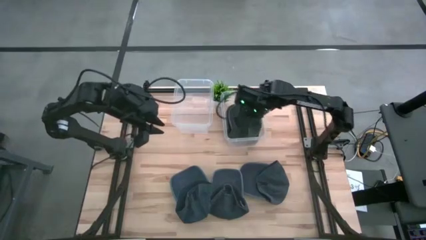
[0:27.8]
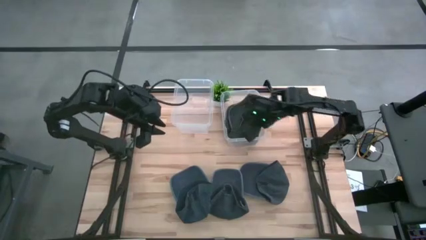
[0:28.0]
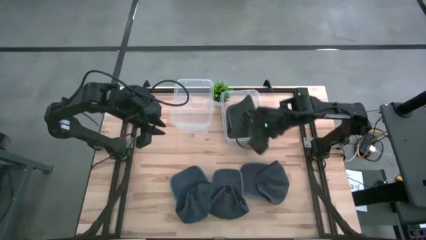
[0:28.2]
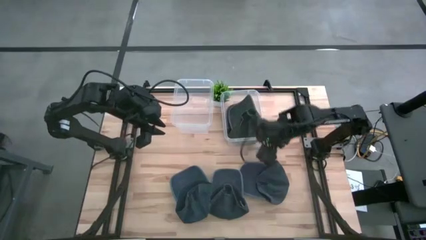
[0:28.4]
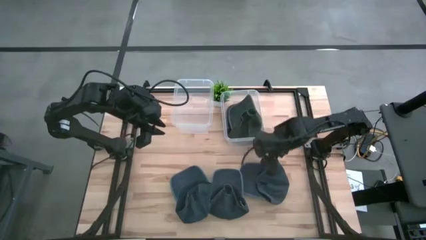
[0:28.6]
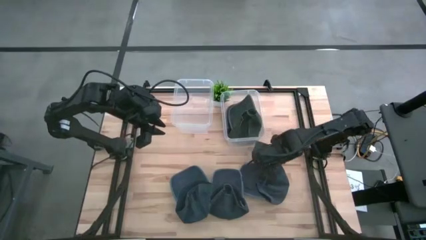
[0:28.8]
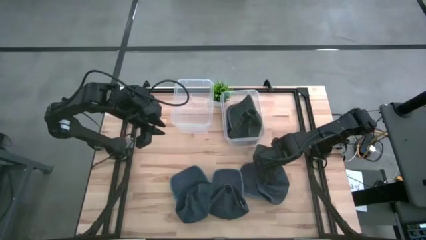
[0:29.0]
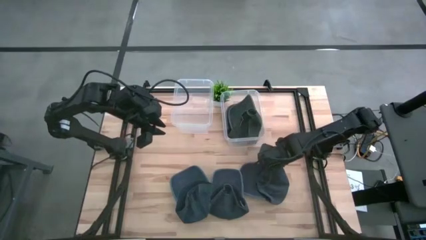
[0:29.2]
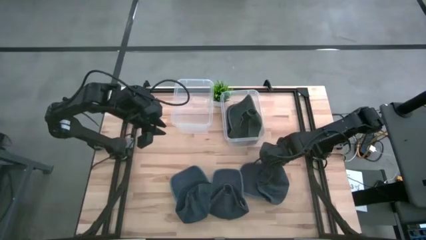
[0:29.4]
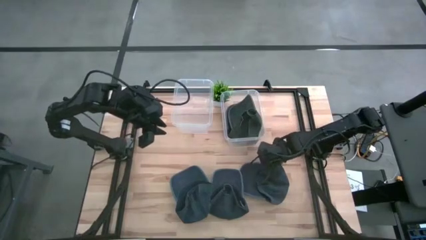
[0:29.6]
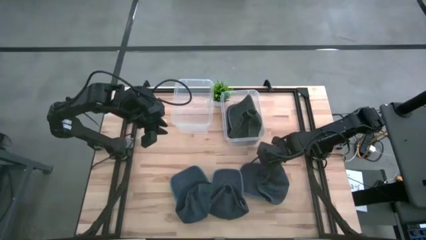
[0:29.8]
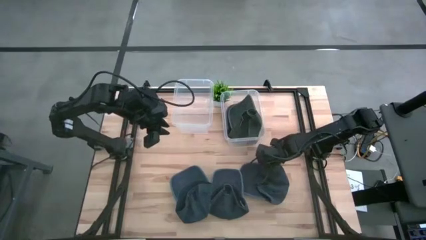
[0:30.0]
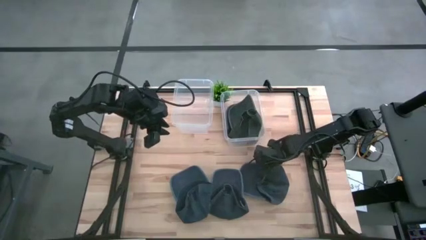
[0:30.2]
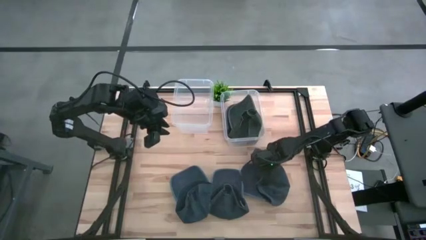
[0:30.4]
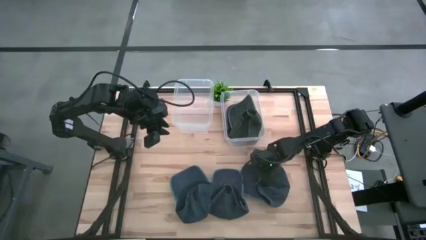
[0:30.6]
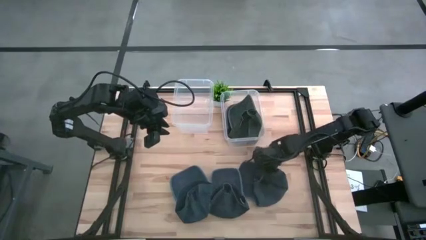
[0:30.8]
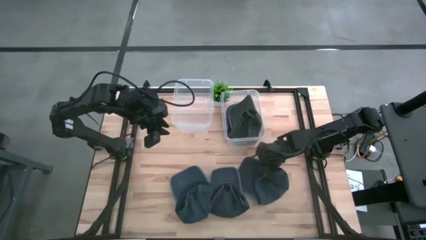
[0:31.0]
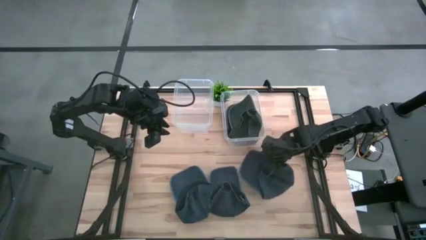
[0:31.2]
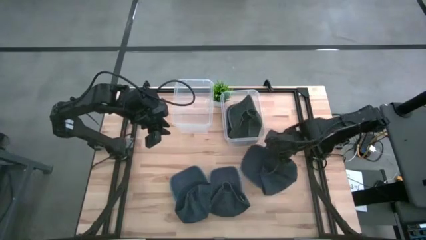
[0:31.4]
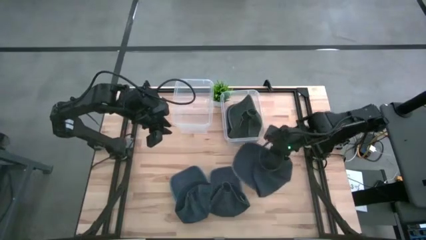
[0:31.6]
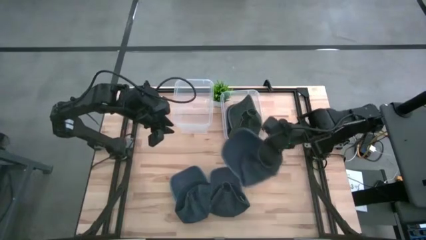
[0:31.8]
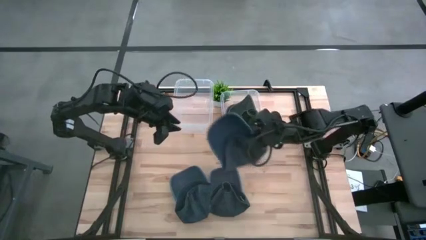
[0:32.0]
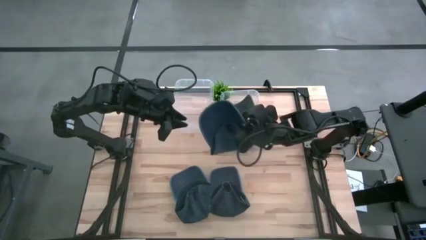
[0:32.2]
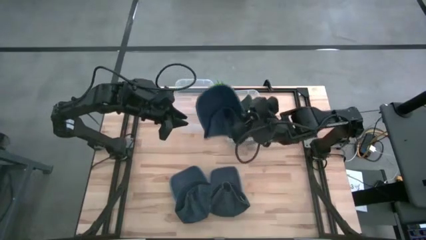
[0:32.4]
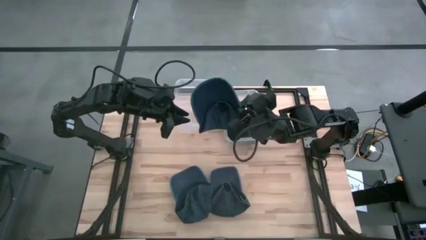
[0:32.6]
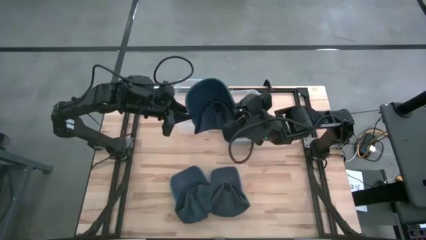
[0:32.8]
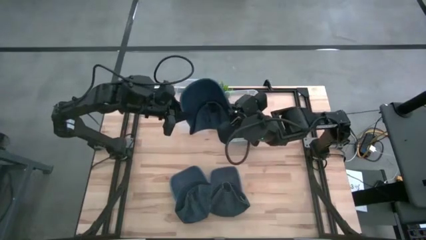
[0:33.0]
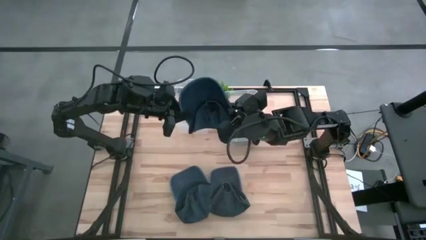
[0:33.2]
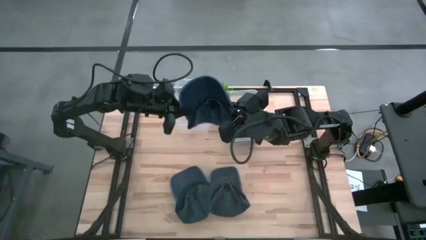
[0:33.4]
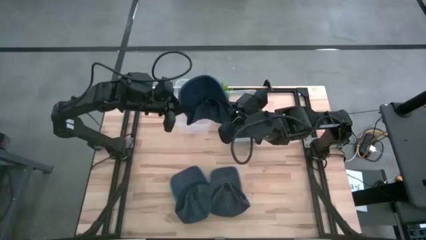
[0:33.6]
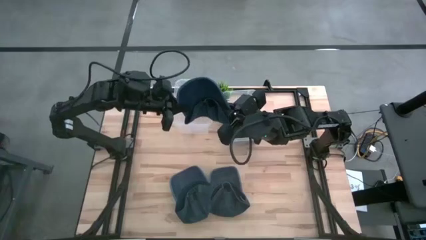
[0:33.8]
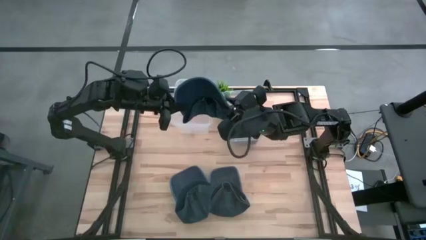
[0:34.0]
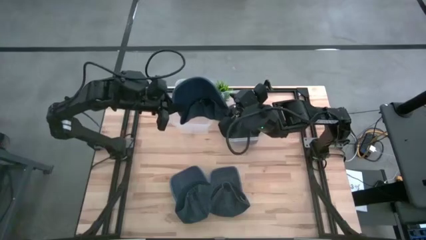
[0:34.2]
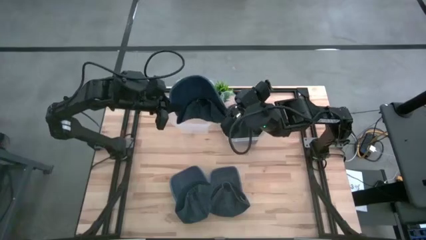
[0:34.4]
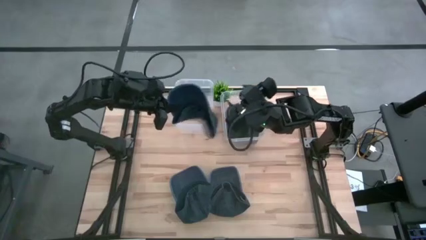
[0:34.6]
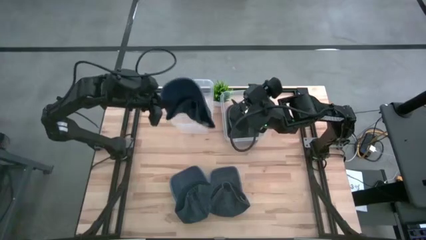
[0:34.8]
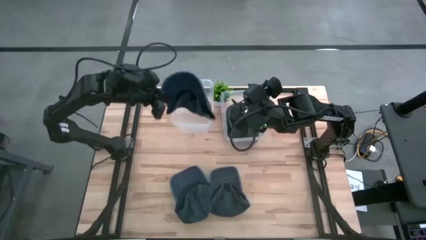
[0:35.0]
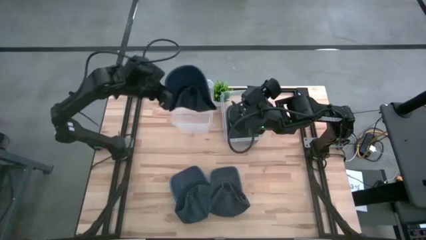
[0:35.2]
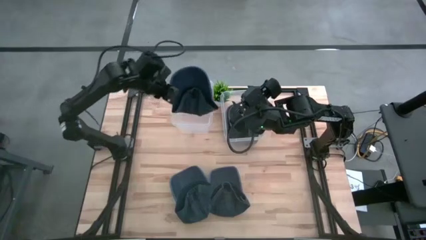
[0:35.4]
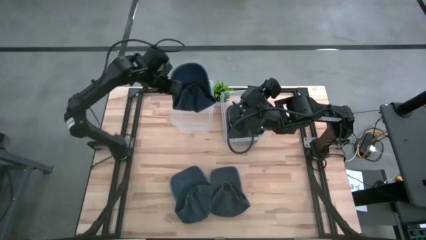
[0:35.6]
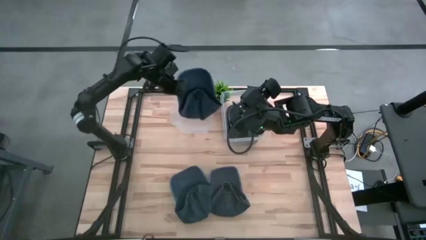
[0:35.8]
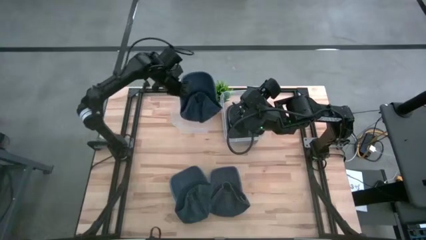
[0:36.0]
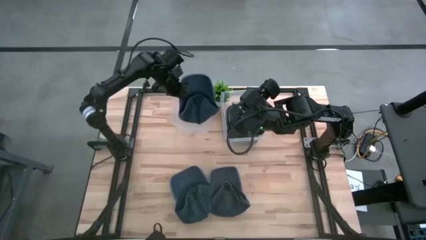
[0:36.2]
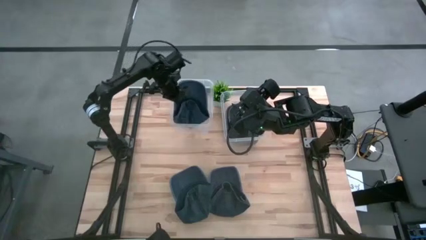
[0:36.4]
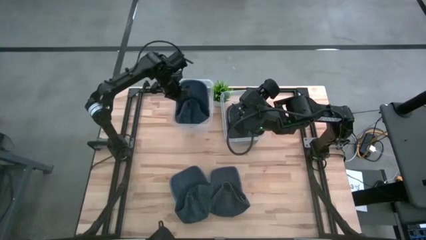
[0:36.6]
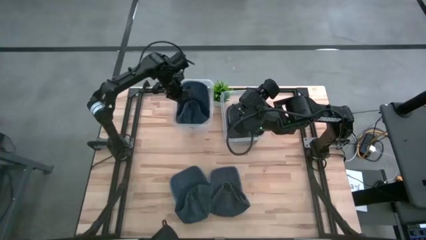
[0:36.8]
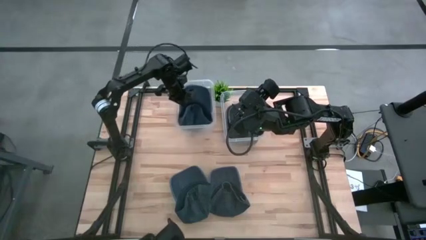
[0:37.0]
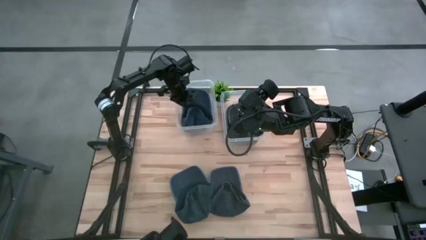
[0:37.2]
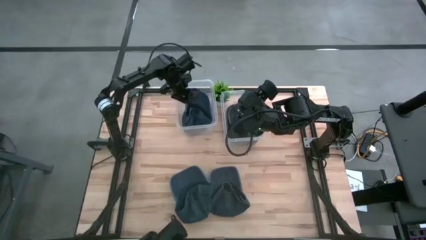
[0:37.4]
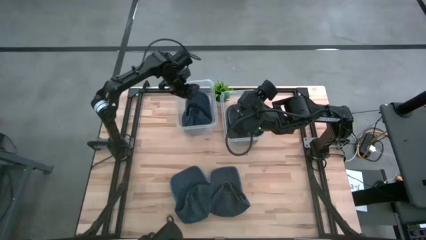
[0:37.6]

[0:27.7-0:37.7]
Task: Pick & Place hat
Put the right blue cap into the left transparent bin

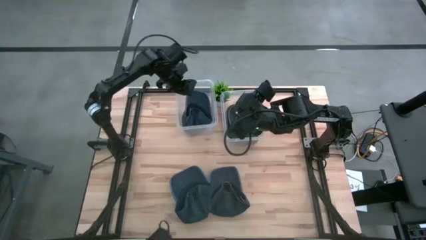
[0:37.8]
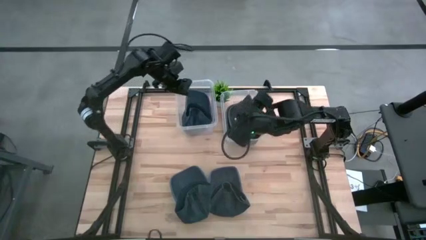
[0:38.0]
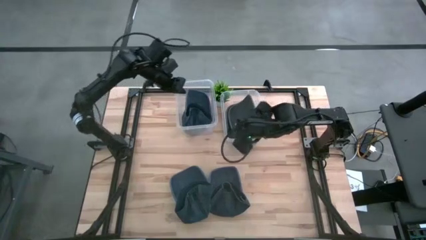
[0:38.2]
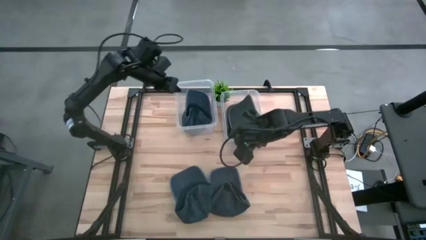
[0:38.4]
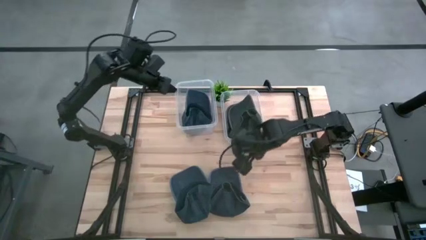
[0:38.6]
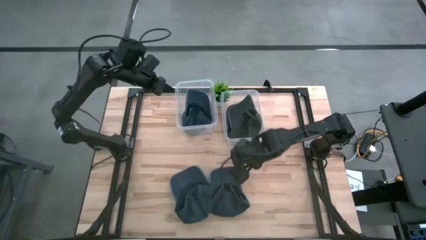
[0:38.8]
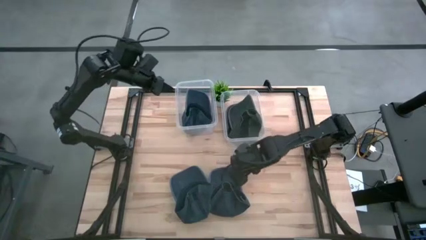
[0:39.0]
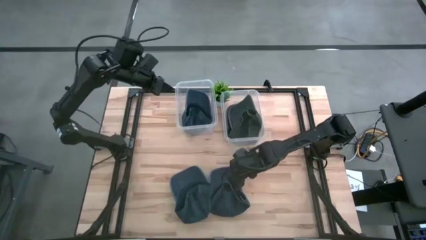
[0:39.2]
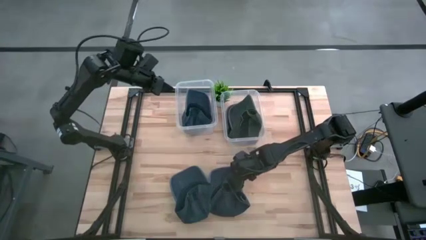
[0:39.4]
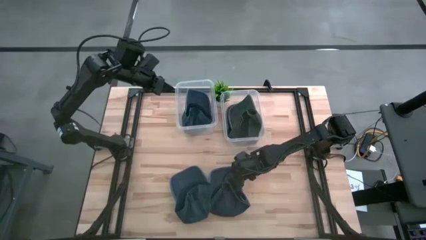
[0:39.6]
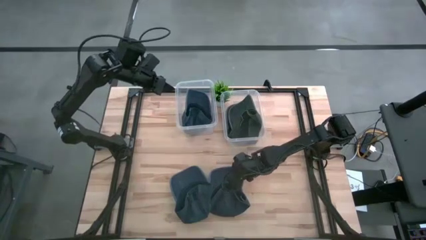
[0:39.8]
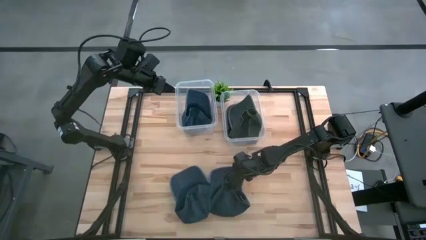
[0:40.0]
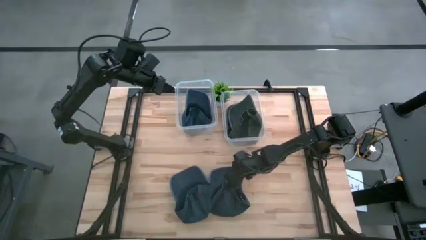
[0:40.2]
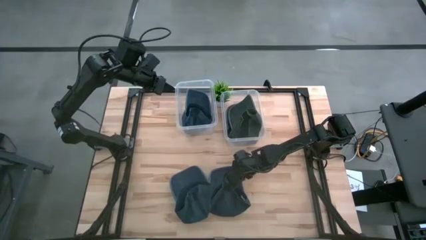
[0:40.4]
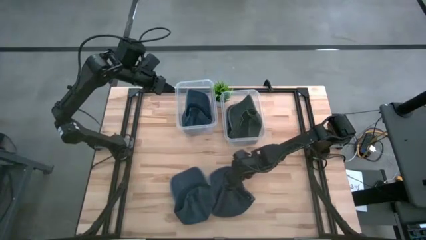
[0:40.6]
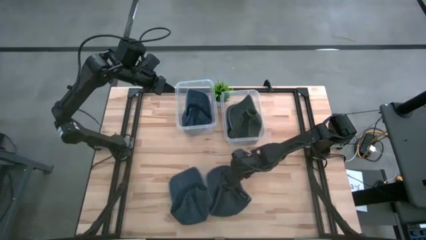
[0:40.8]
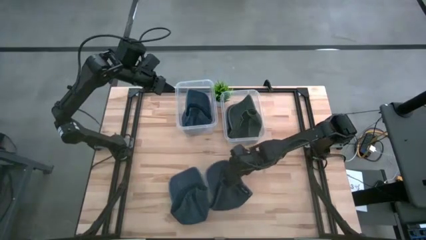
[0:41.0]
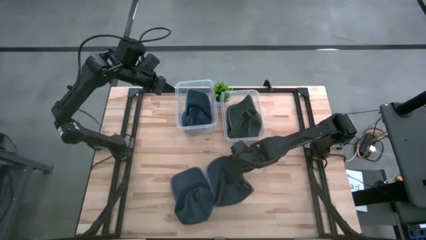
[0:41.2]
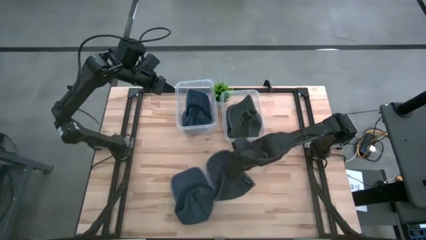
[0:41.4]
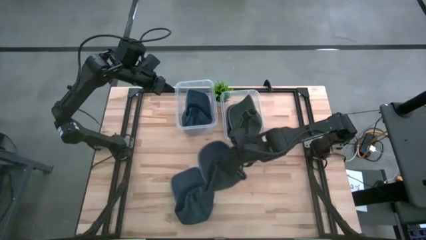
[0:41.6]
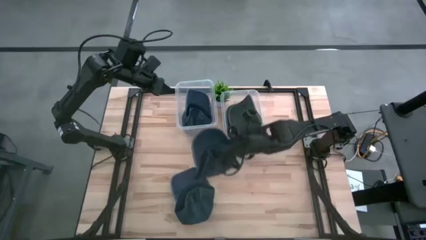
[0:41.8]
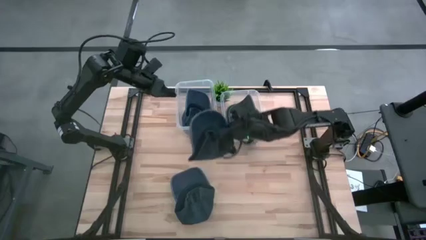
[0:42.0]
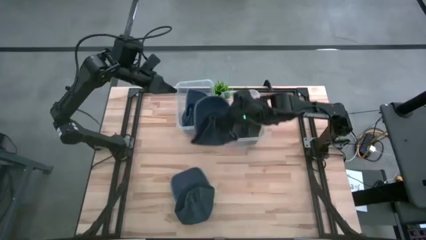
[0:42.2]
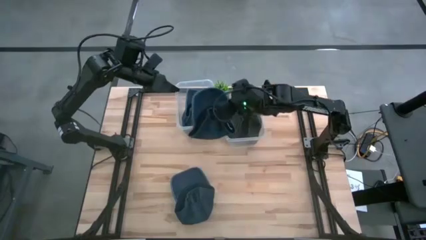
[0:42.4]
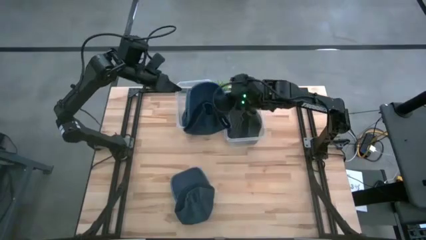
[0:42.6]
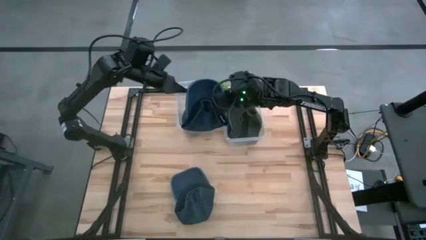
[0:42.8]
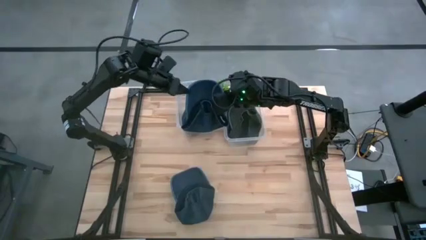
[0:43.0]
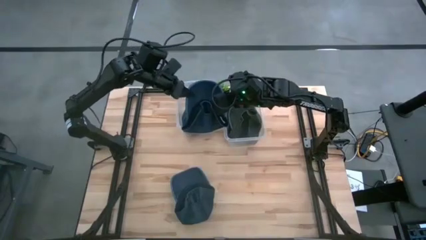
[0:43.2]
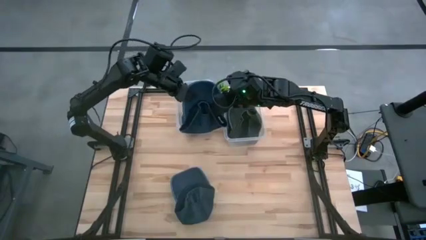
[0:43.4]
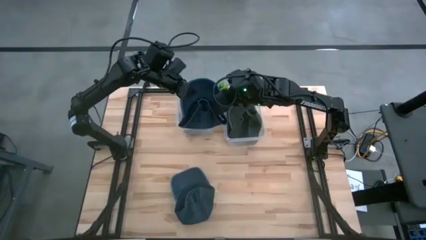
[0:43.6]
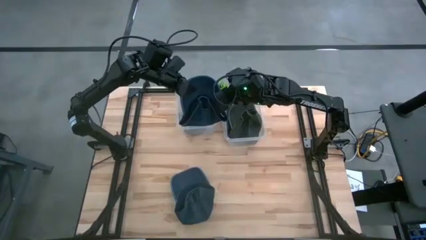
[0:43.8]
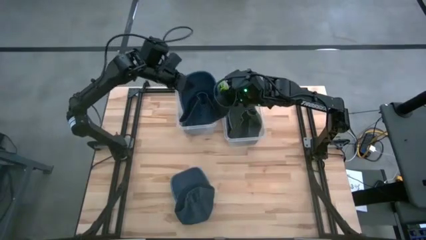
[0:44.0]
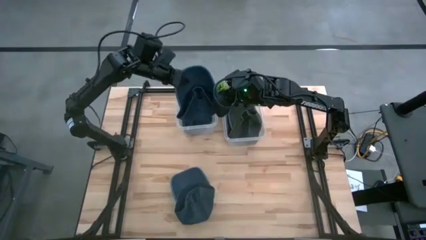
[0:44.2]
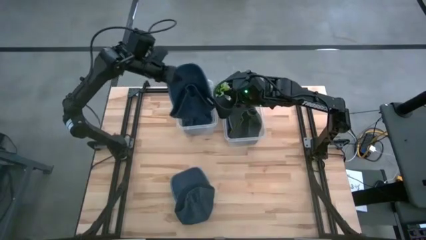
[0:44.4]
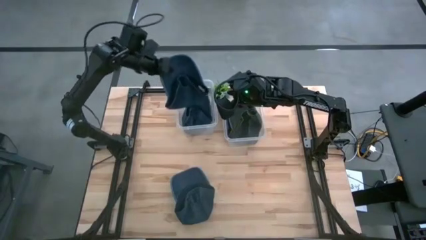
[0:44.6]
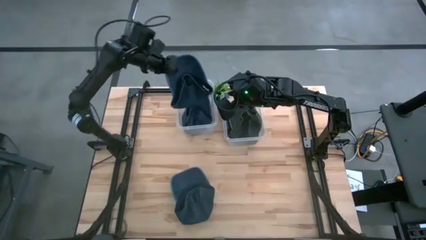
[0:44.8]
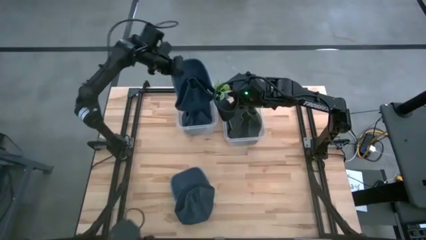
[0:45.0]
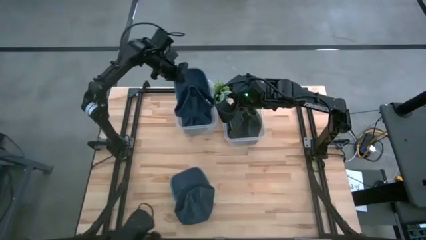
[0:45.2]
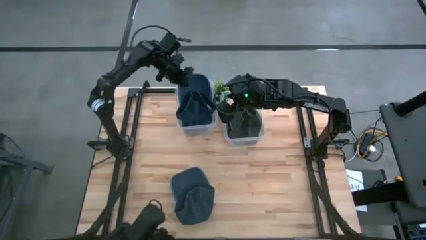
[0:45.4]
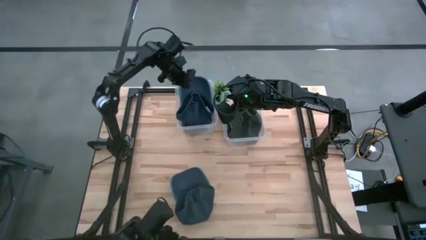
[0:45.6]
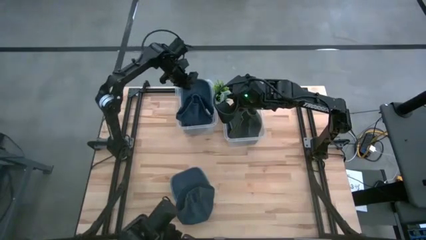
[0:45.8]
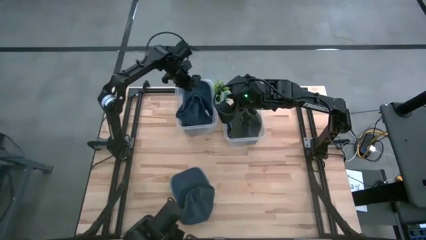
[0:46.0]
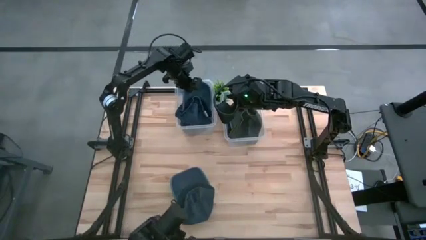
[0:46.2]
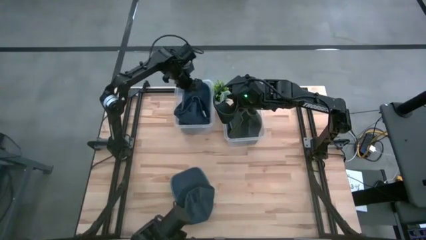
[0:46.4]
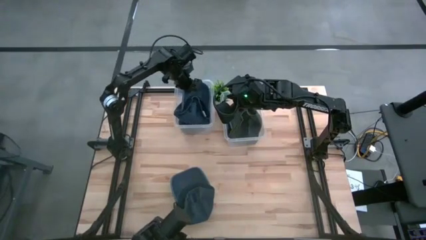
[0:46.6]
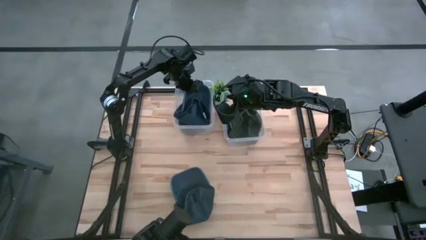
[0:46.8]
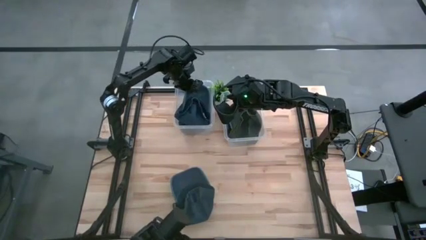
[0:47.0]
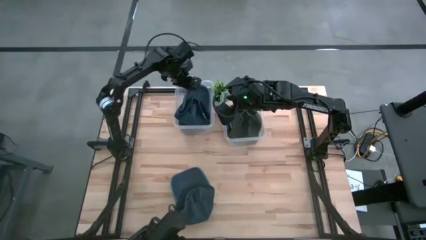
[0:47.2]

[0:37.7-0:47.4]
Put the right blue cap into the left transparent bin
